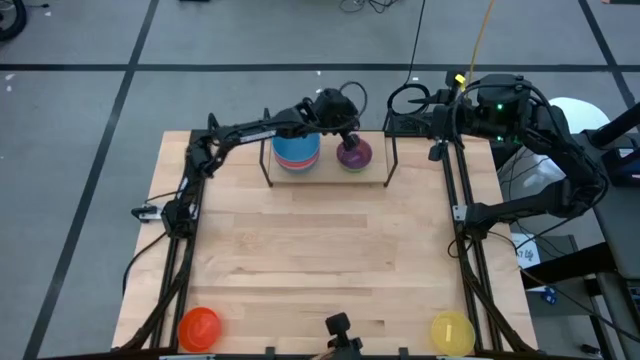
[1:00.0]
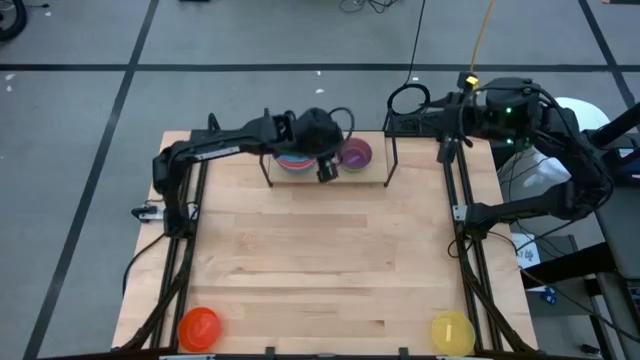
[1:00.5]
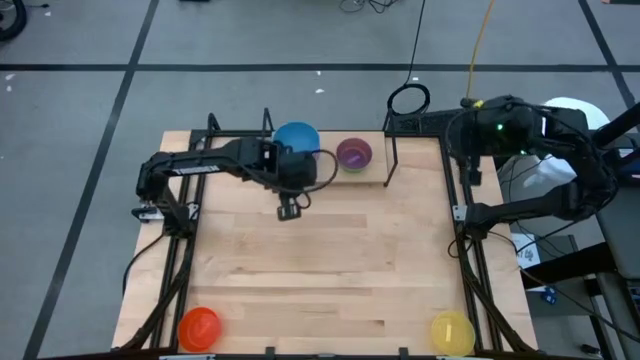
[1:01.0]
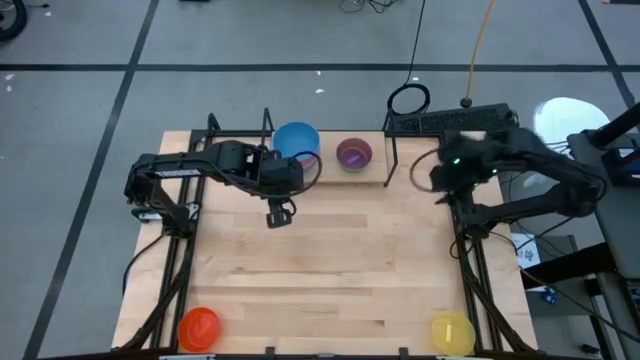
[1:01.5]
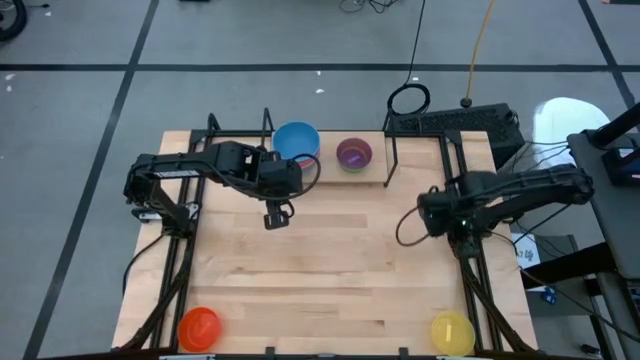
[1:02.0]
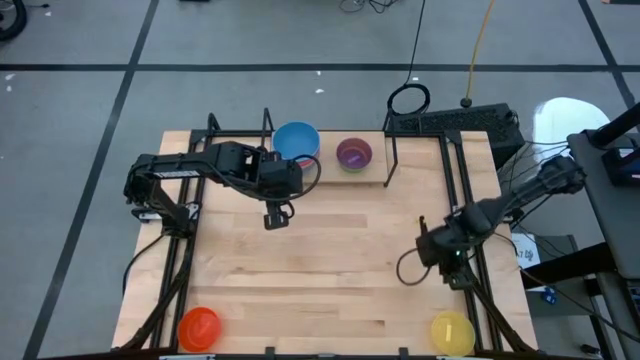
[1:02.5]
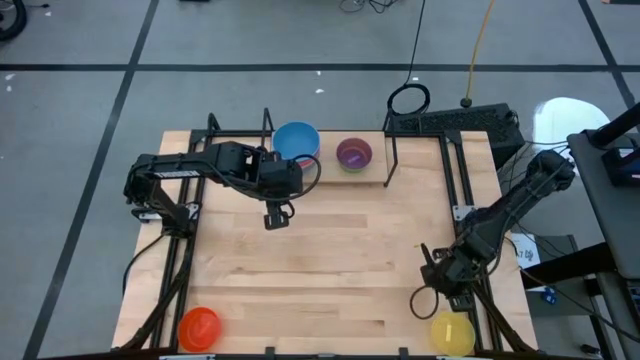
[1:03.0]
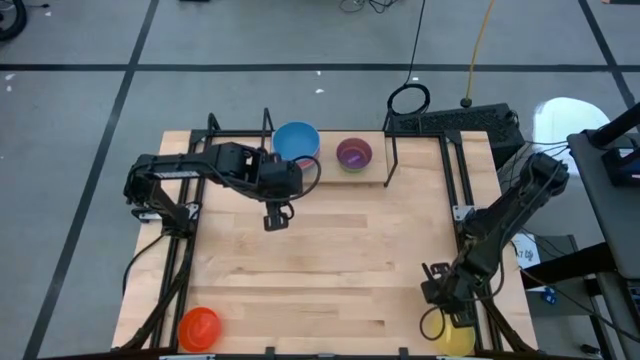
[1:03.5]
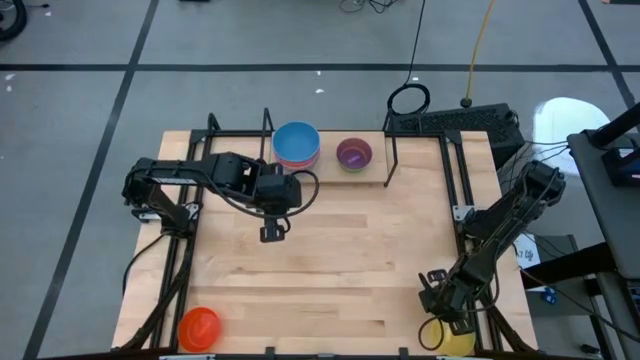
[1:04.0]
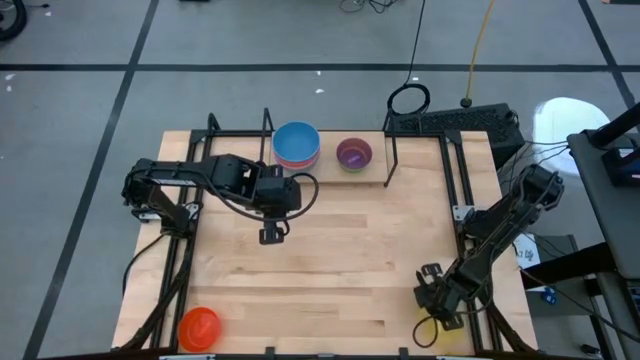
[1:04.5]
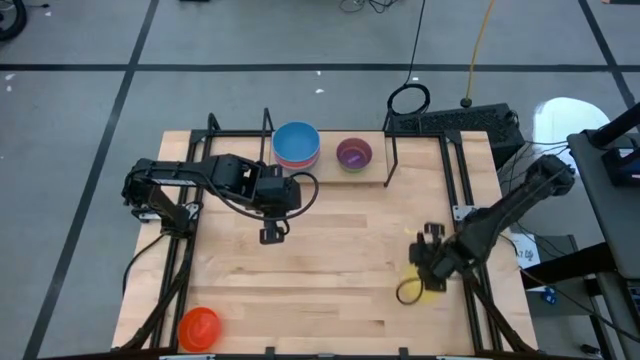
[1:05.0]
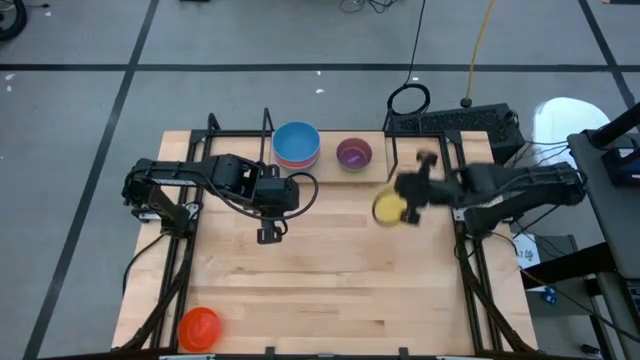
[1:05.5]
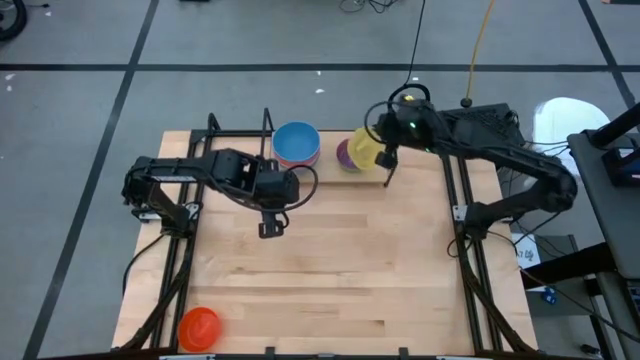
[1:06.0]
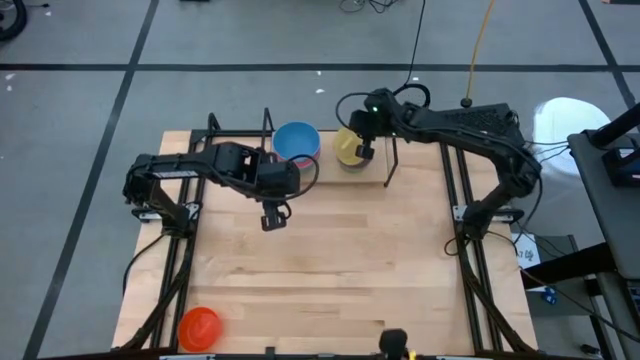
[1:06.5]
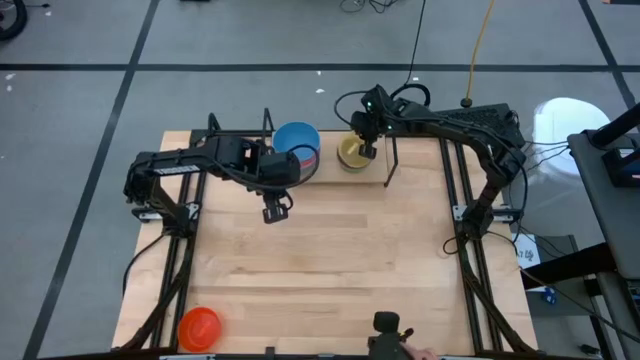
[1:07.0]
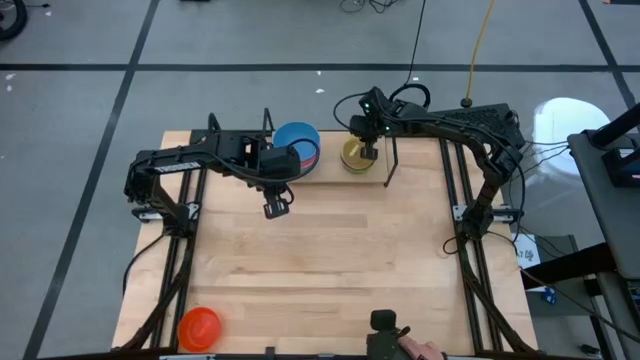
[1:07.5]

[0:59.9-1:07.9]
Task: Place and stack bowls onto a shelf
Stack the yellow bowl on top of the violet bowl on the shelf

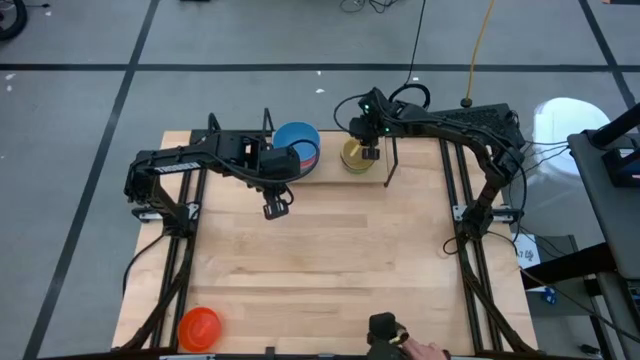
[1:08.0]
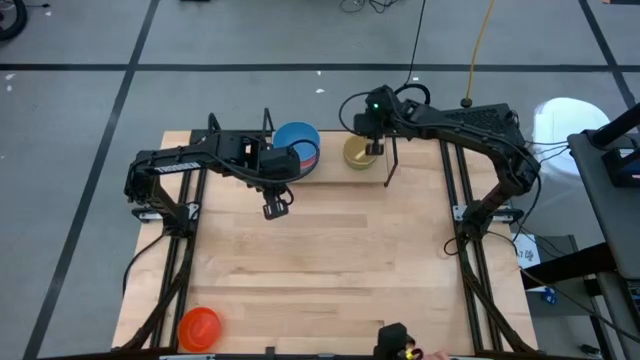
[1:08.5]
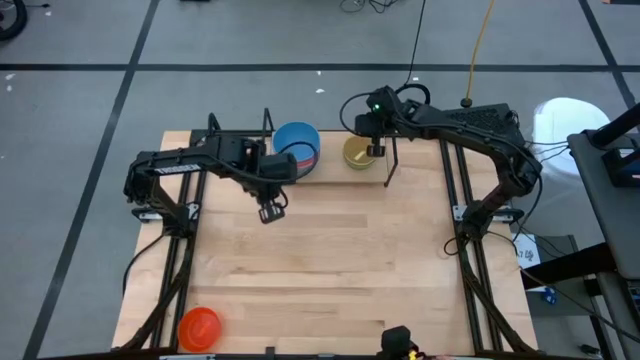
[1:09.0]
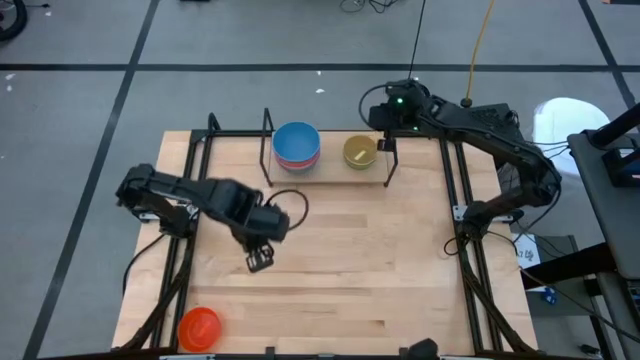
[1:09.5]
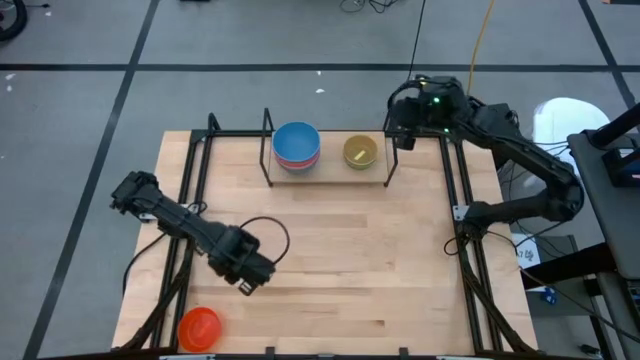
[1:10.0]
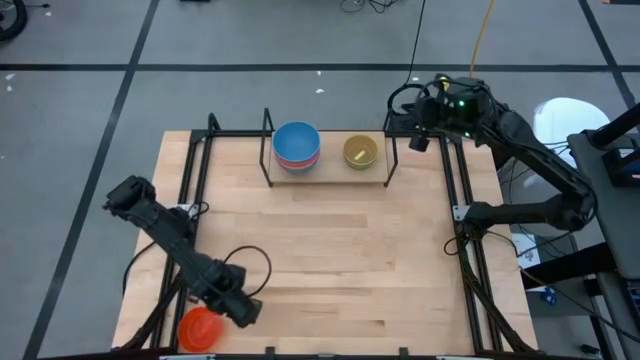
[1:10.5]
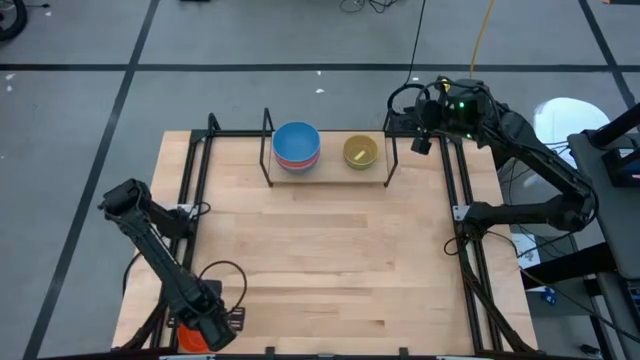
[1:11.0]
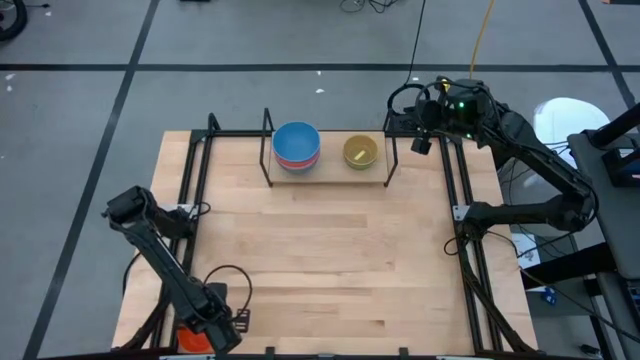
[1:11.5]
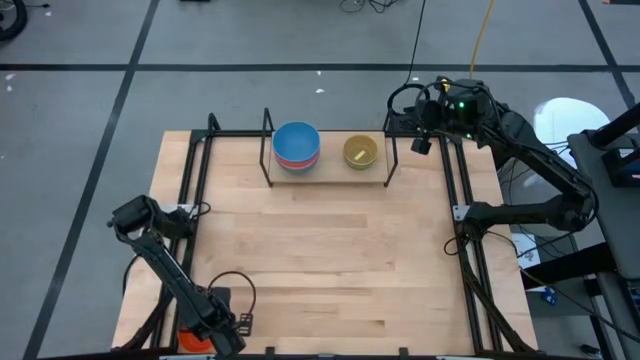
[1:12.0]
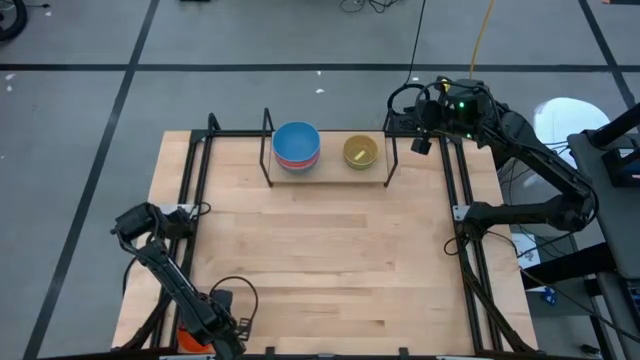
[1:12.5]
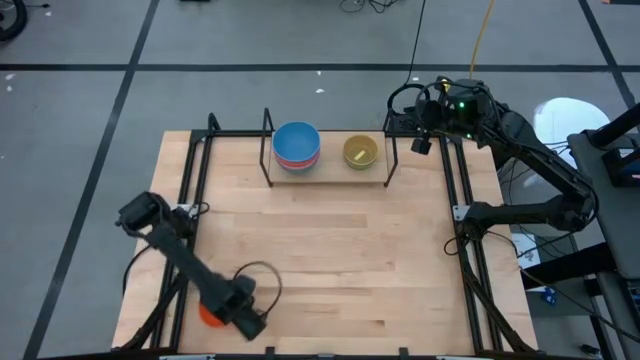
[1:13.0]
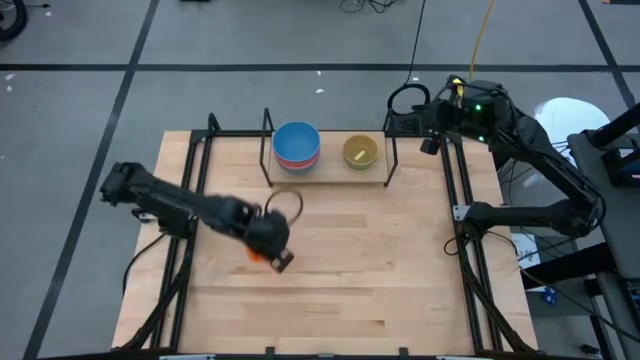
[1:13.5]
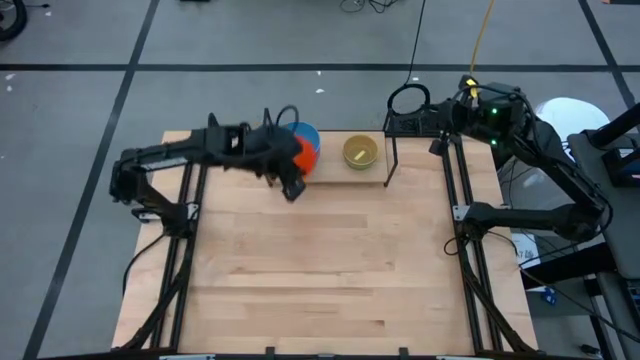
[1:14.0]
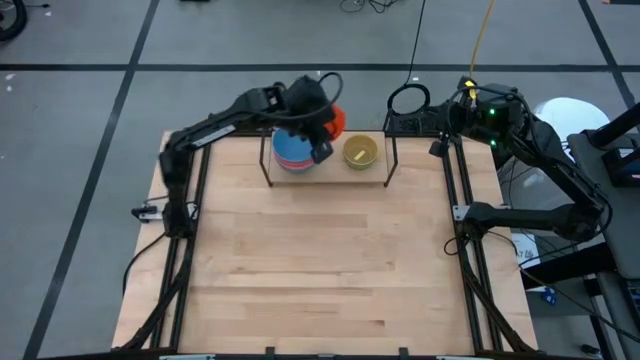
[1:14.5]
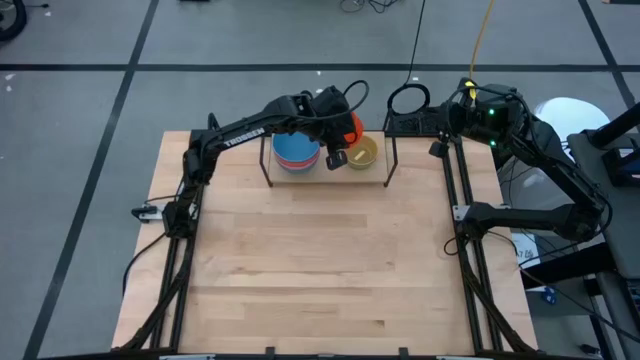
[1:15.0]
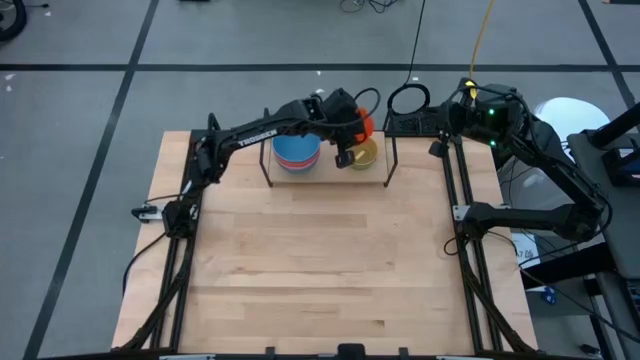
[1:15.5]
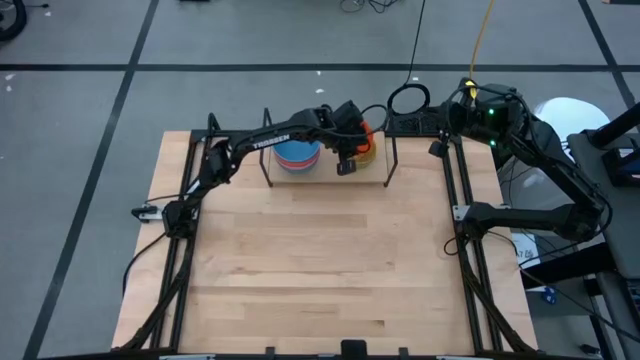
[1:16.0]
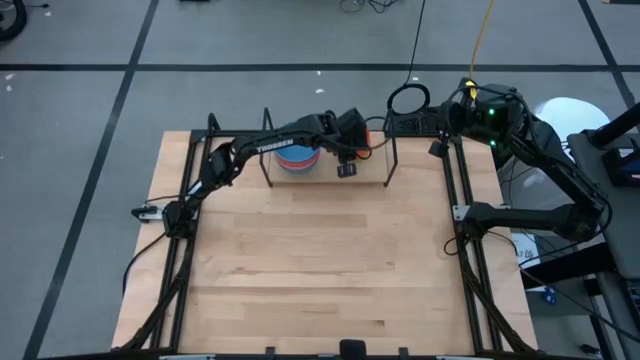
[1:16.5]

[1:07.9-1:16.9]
Stack the light orange bowl on top of the yellow bowl on the shelf

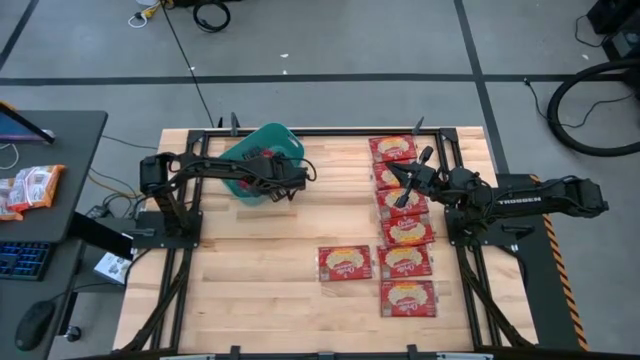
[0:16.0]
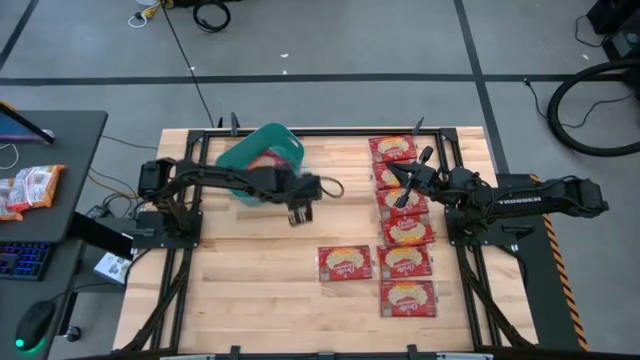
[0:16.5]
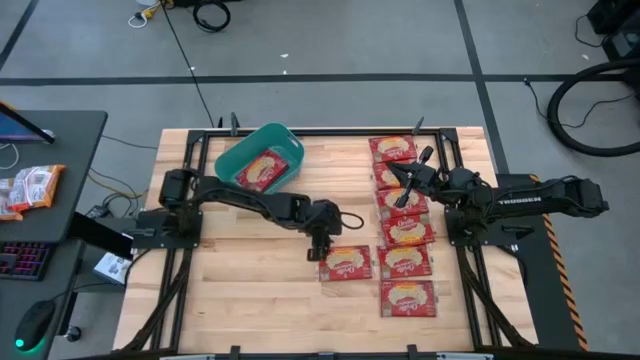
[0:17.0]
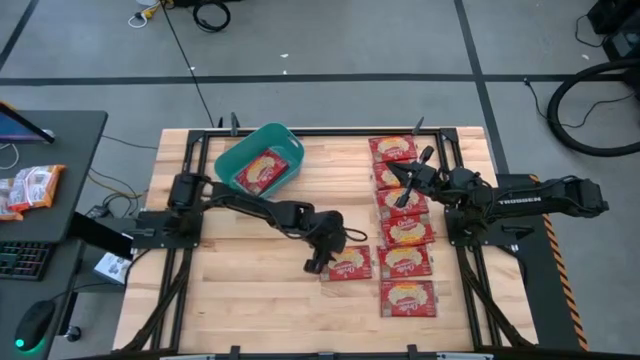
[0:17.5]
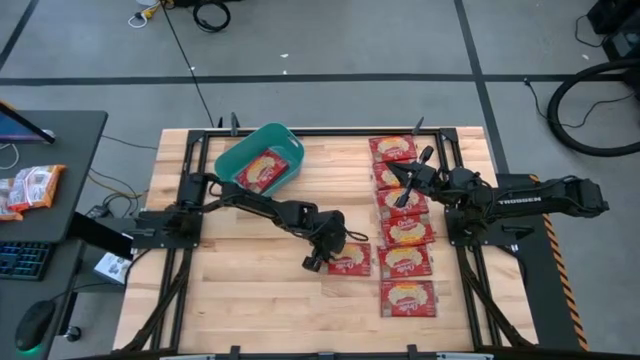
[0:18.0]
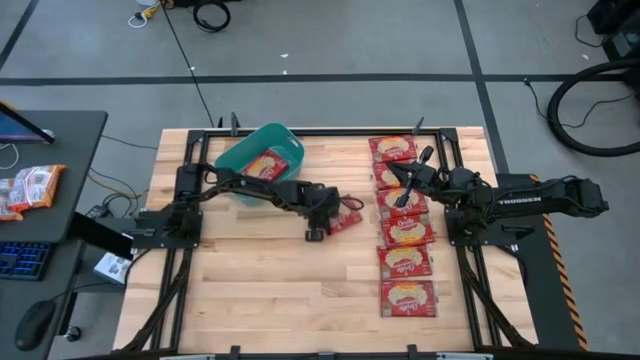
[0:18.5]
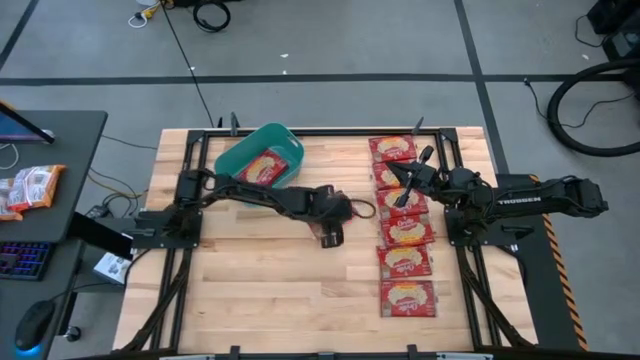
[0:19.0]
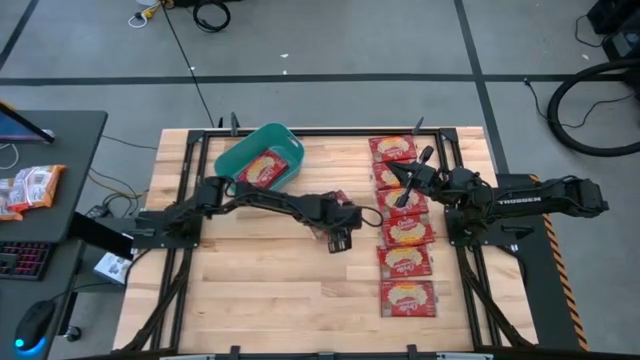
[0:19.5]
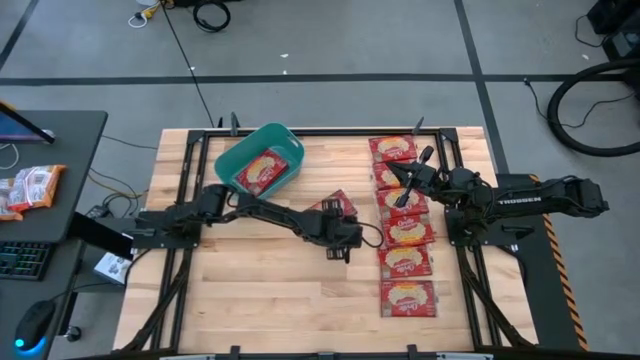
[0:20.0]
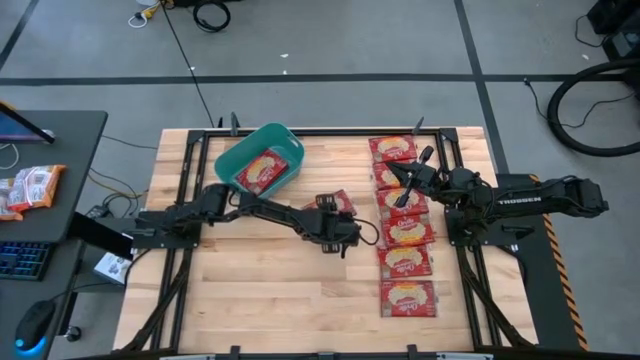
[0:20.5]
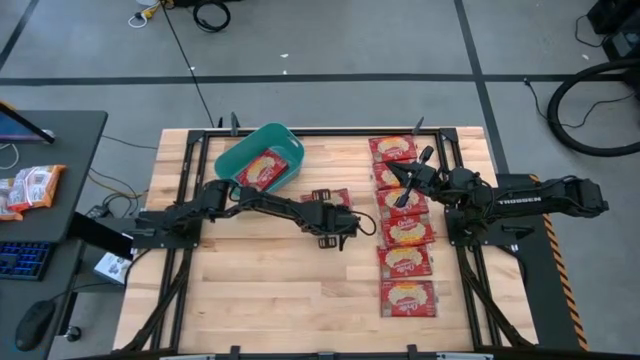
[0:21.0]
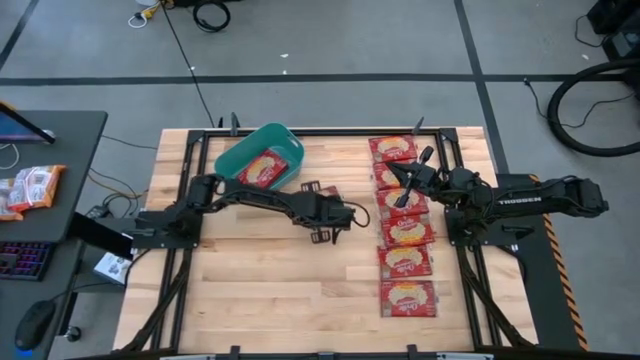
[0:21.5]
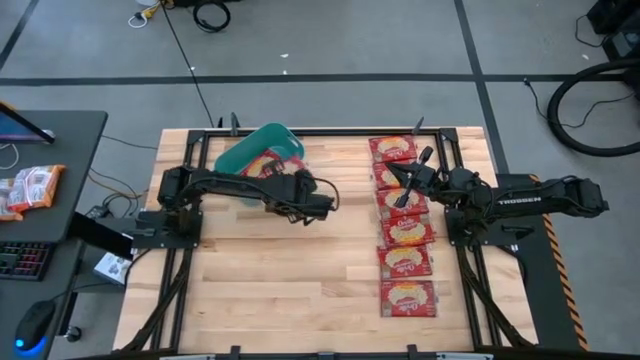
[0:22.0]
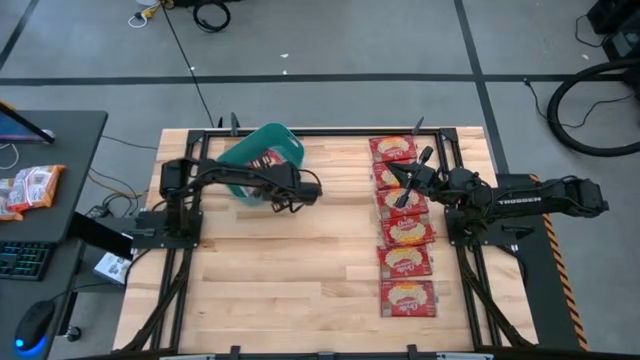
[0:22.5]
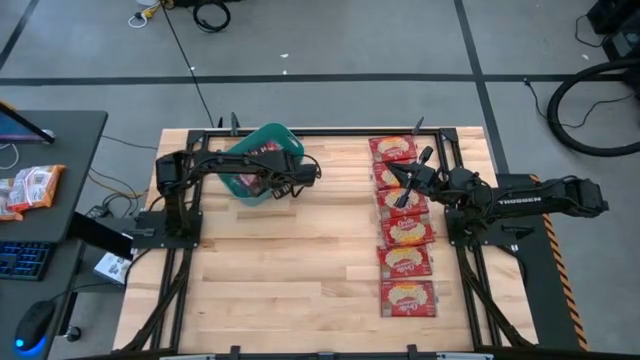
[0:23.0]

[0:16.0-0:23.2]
Task: Sort popcorn bags into baskets
Put the popcorn bag into the bin
